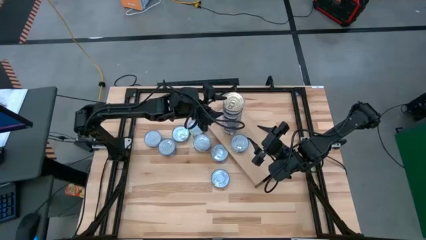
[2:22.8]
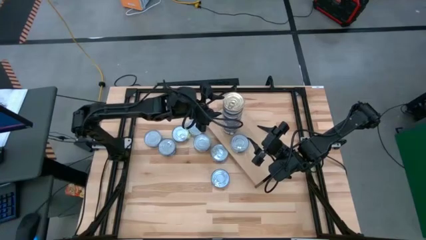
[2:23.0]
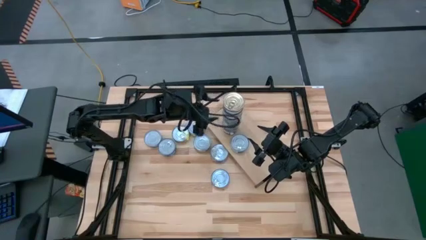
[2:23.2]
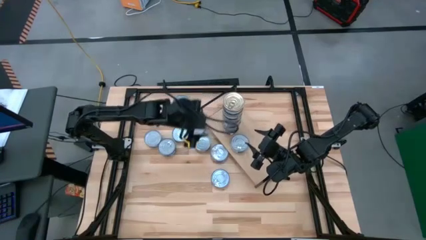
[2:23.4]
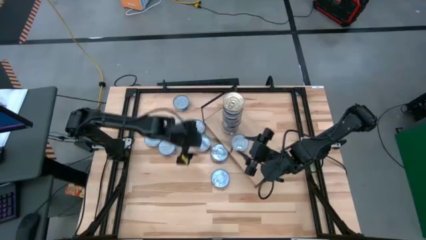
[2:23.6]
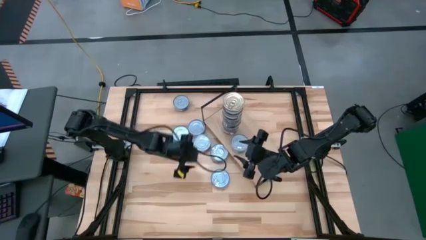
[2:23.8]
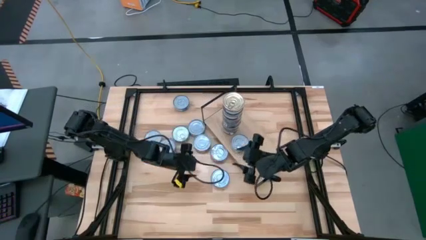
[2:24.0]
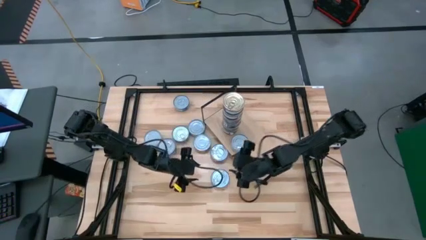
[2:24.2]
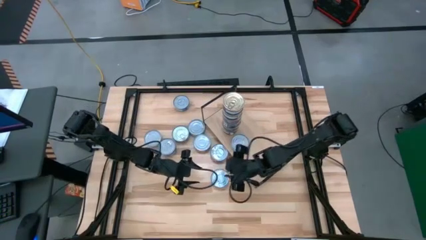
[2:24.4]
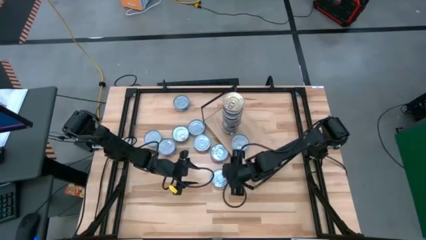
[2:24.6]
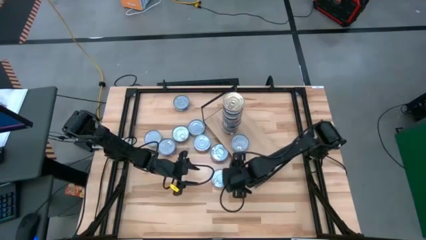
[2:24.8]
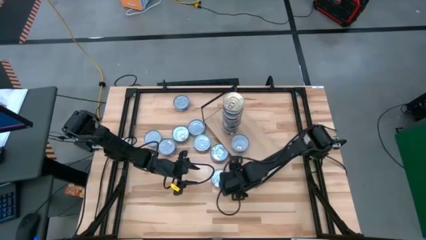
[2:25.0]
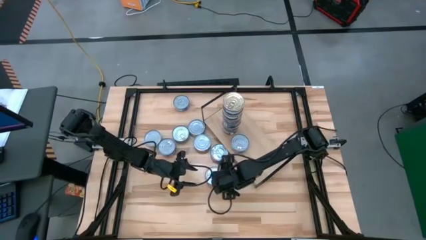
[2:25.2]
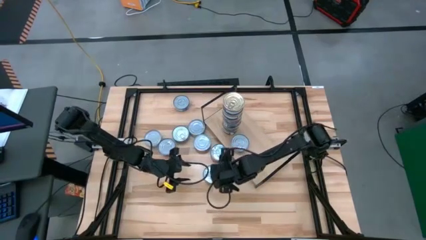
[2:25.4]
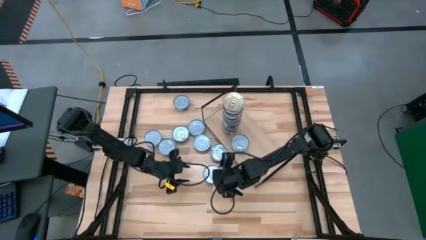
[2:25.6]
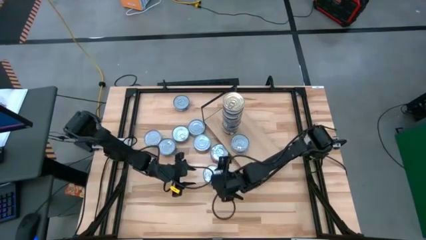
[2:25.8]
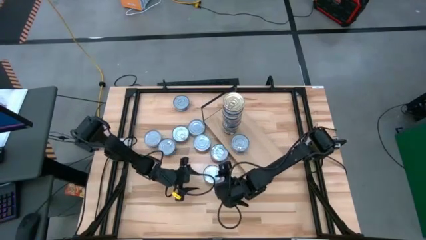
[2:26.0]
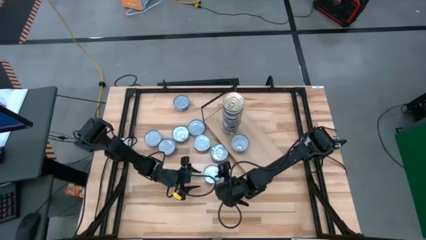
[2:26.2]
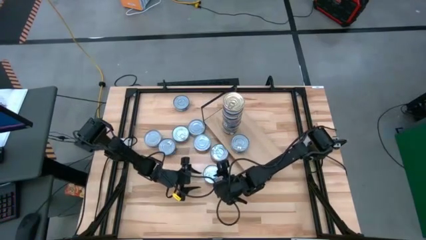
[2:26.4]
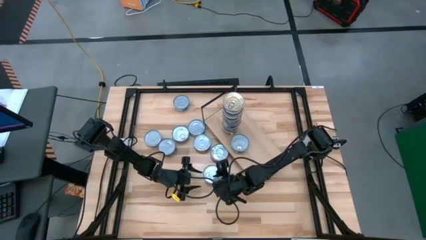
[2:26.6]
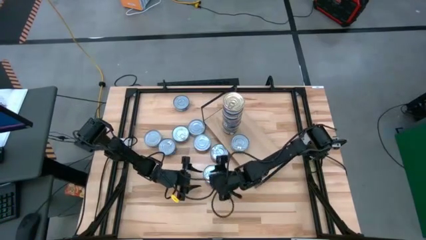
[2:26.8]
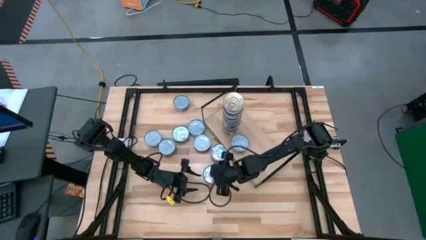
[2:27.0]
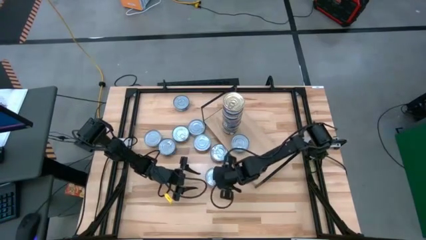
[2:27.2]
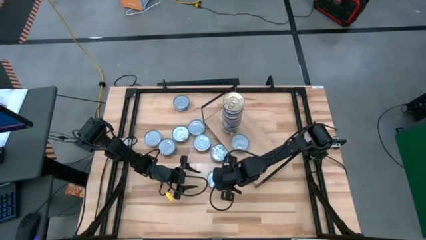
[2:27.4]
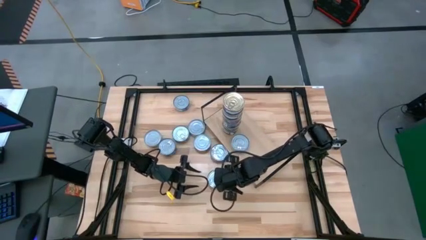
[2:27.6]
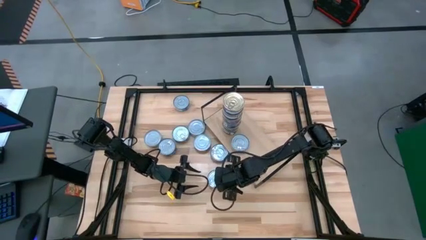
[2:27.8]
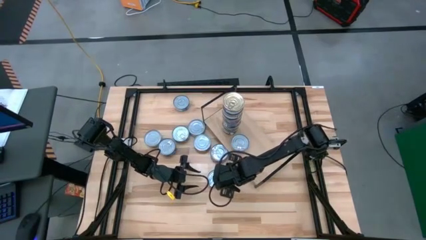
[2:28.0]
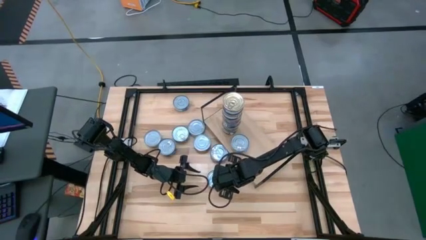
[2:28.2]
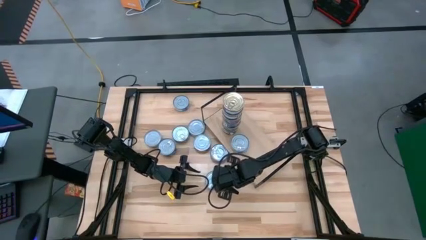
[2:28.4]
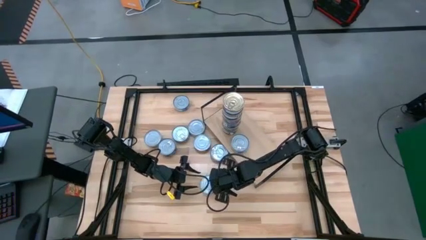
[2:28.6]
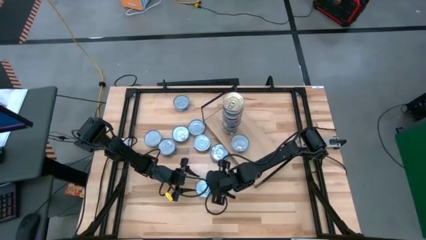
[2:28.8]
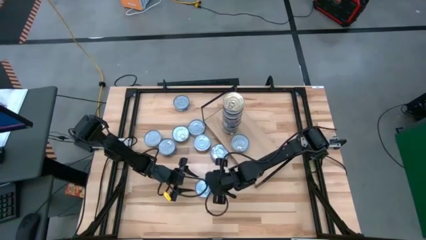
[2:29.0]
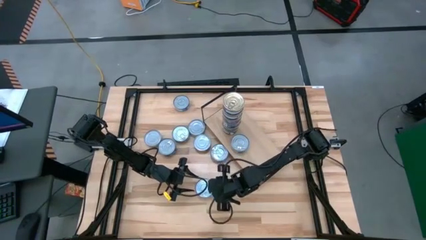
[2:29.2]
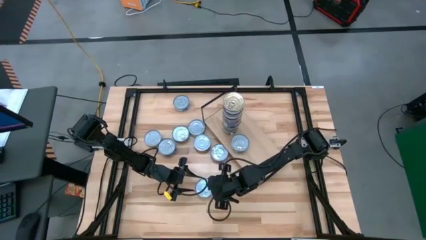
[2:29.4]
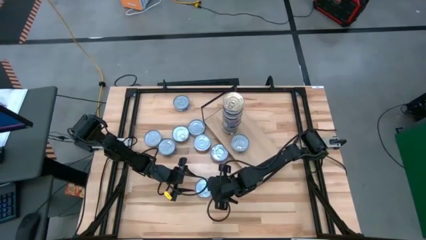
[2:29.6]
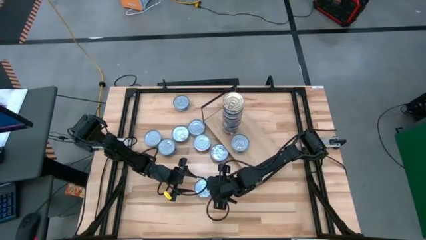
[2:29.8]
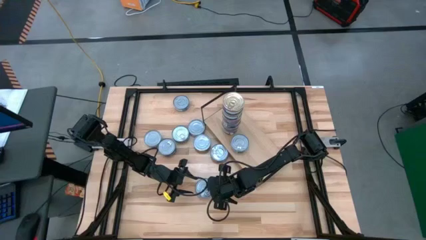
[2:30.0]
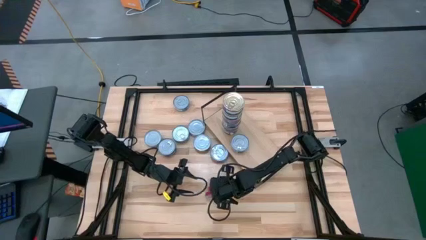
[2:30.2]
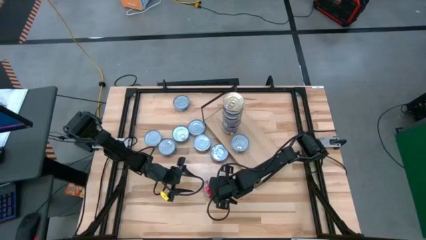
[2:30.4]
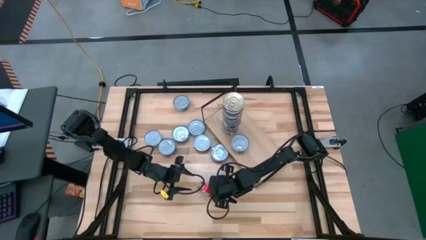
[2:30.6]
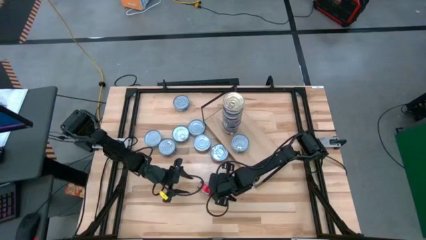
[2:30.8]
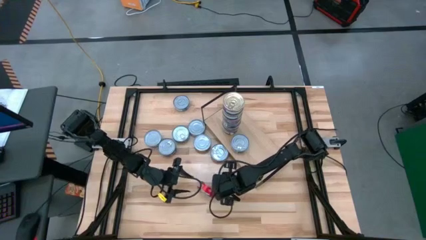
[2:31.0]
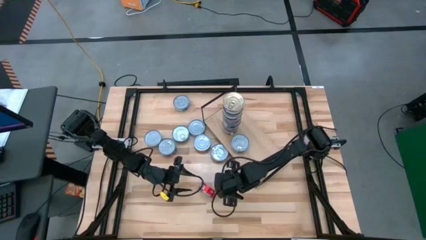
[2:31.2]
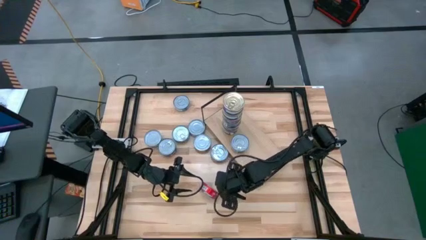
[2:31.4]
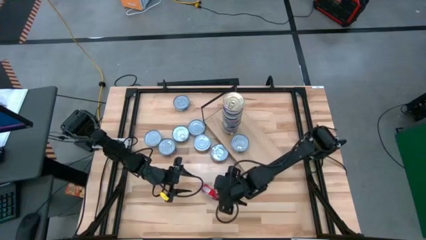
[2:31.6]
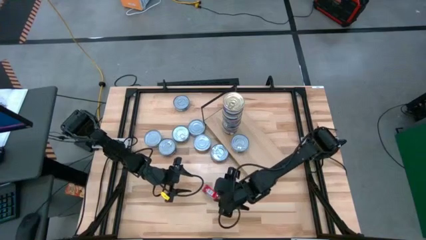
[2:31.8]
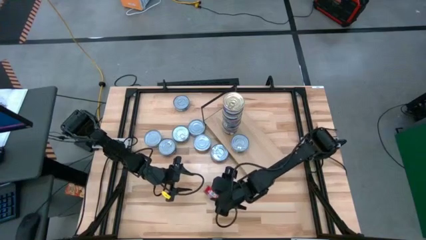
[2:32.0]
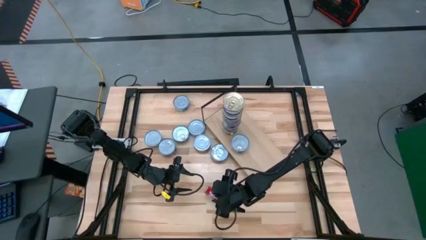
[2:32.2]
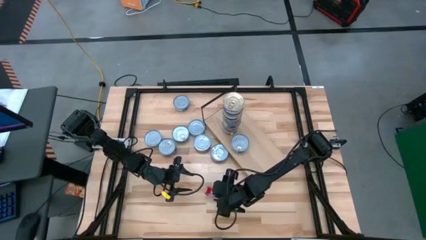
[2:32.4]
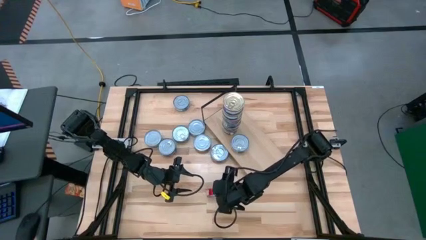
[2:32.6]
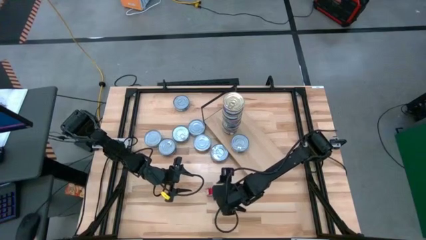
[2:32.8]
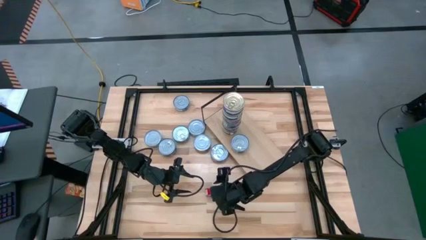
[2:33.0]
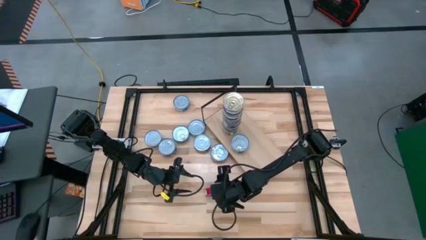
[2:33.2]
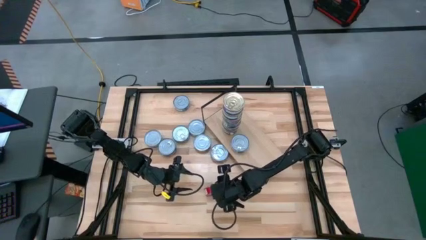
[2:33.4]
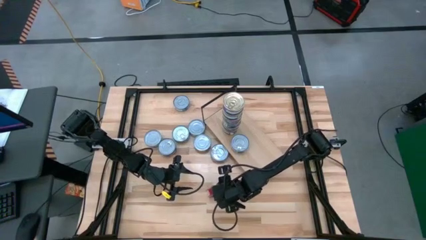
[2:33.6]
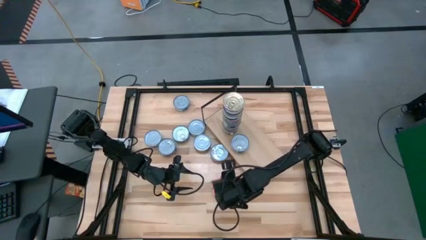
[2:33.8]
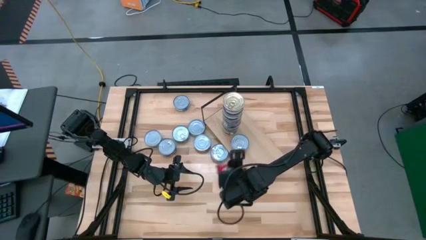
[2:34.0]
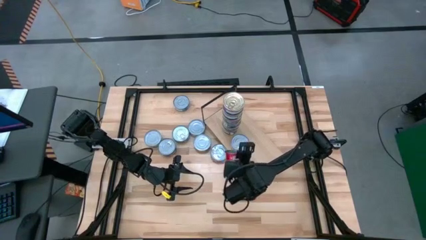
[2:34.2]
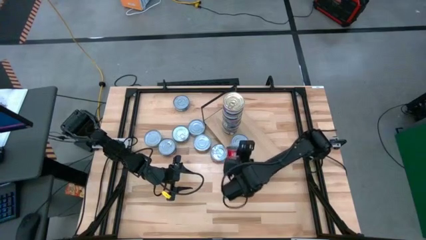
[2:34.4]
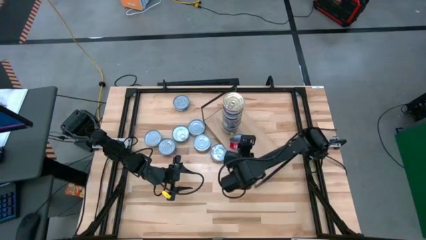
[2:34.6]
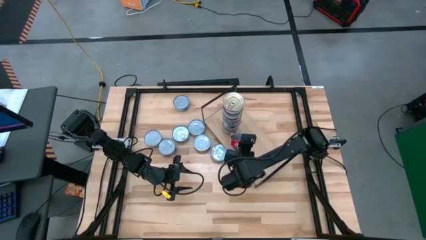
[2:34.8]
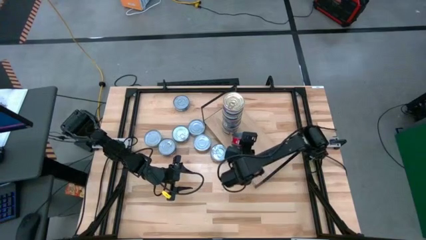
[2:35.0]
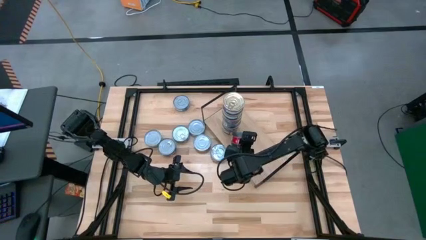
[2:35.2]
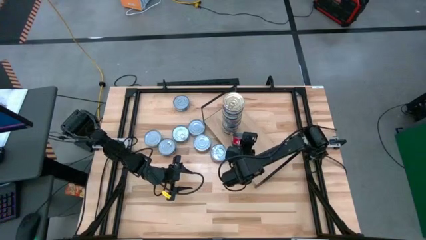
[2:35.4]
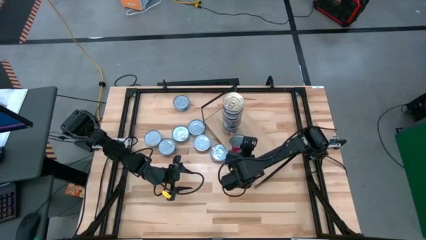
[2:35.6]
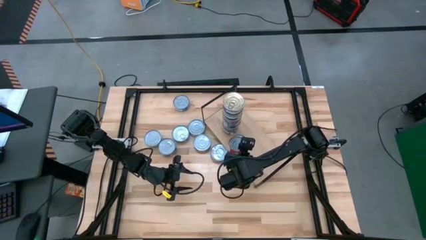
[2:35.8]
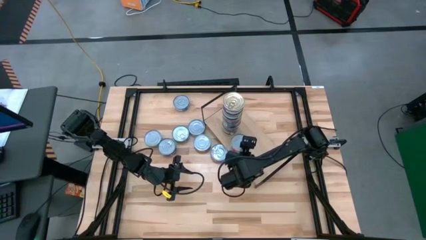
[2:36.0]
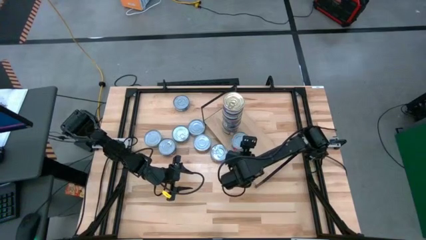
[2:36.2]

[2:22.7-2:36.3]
Task: Stack canned seafood by type on shelf
Stack the red tuna can on top of the green tuna can on the shelf
